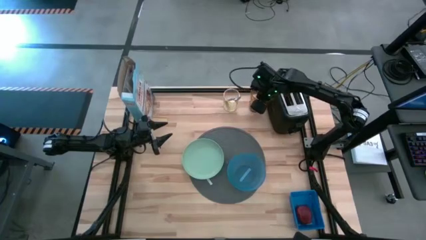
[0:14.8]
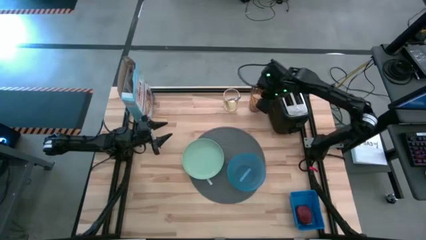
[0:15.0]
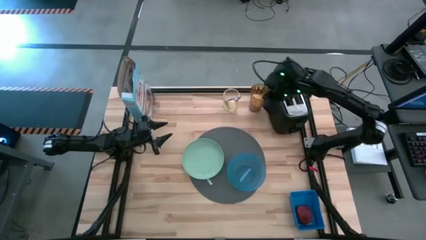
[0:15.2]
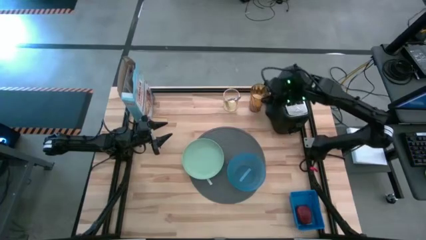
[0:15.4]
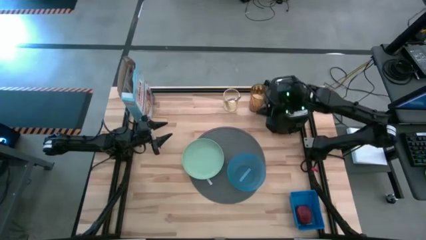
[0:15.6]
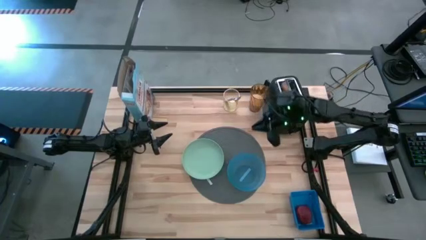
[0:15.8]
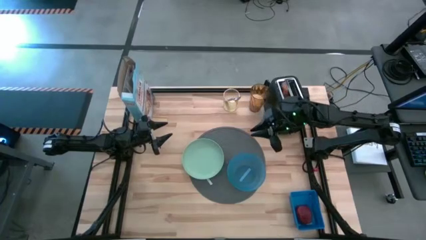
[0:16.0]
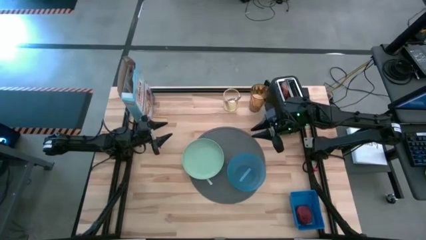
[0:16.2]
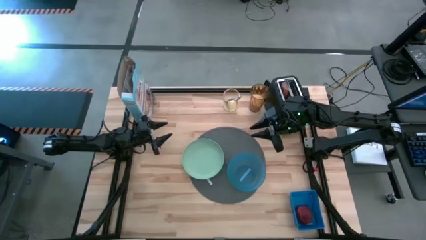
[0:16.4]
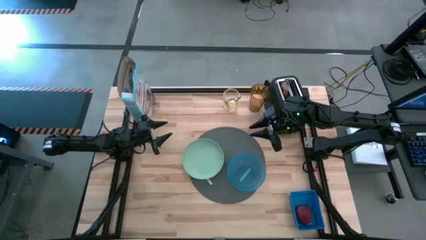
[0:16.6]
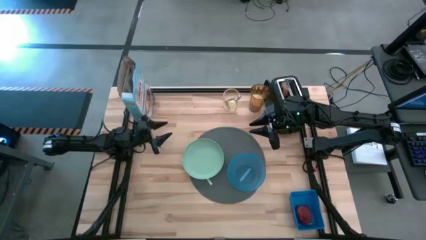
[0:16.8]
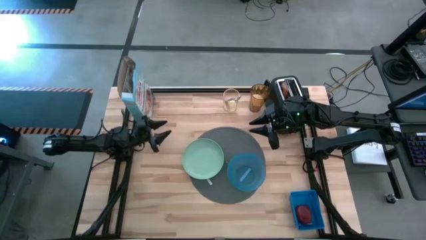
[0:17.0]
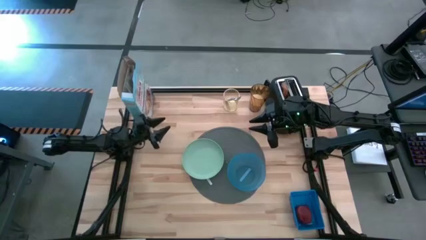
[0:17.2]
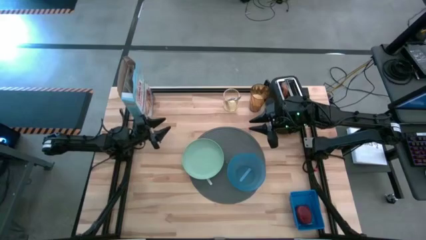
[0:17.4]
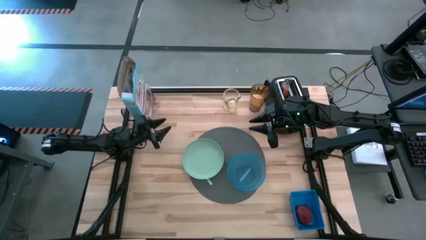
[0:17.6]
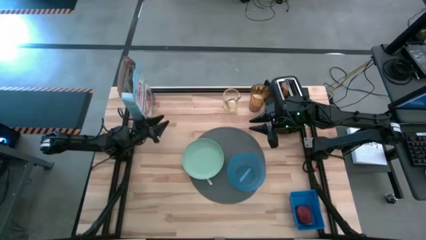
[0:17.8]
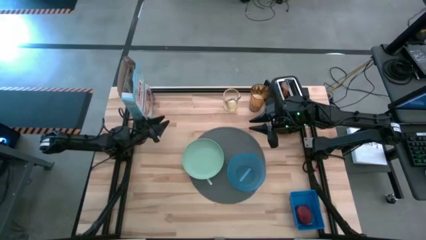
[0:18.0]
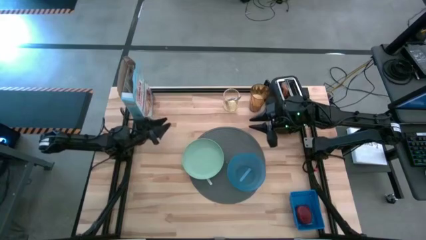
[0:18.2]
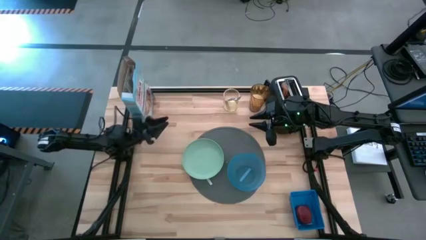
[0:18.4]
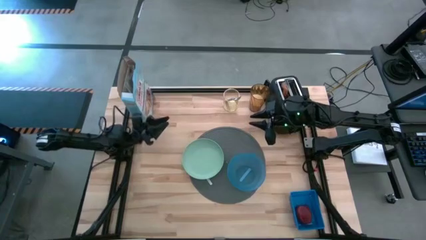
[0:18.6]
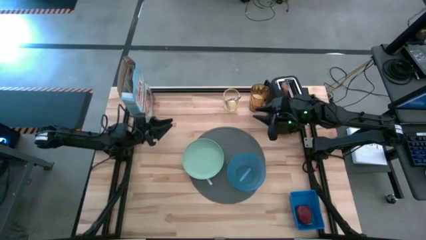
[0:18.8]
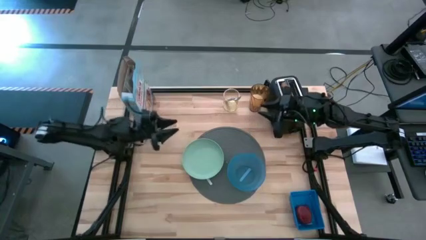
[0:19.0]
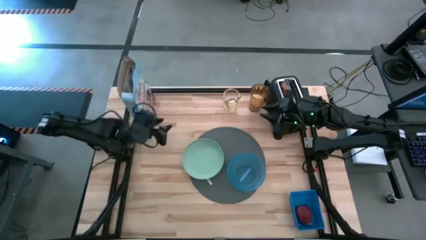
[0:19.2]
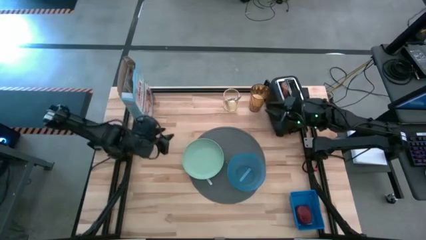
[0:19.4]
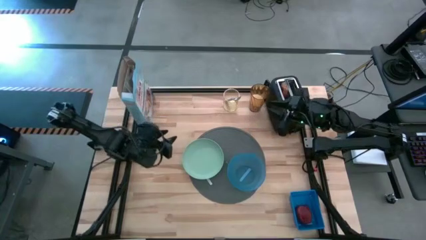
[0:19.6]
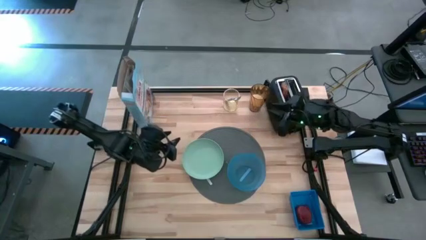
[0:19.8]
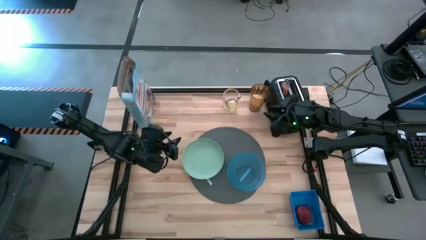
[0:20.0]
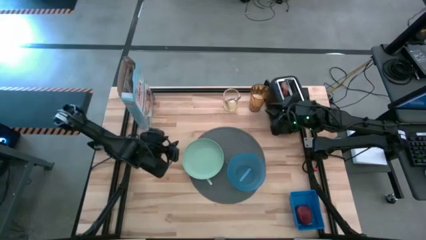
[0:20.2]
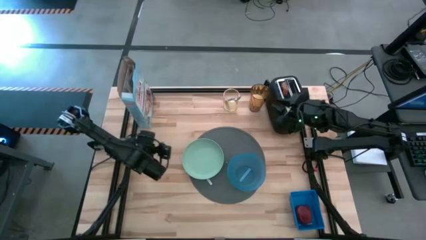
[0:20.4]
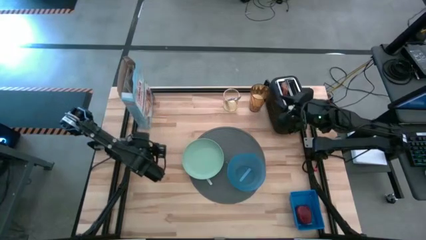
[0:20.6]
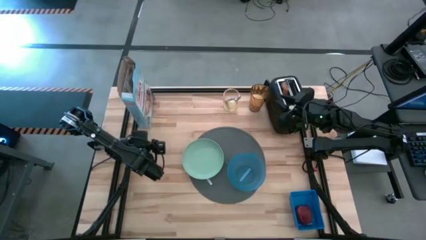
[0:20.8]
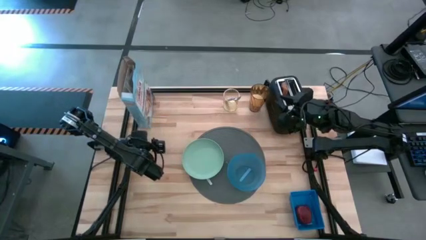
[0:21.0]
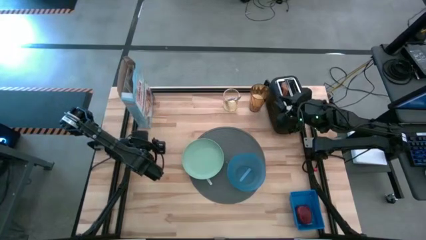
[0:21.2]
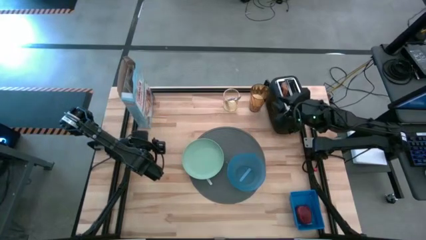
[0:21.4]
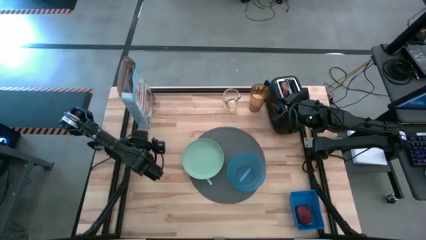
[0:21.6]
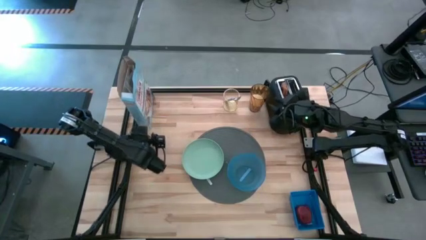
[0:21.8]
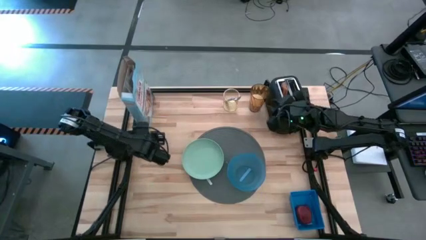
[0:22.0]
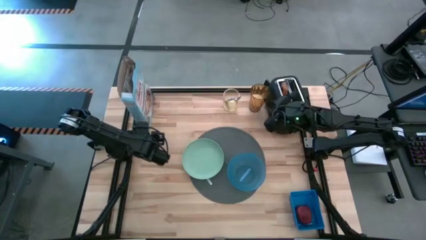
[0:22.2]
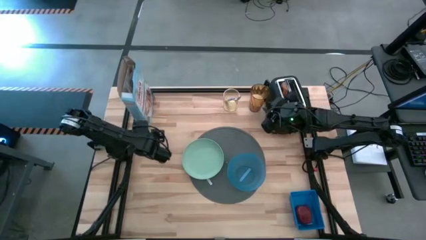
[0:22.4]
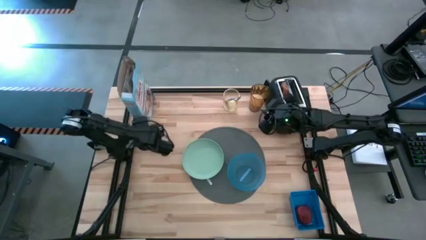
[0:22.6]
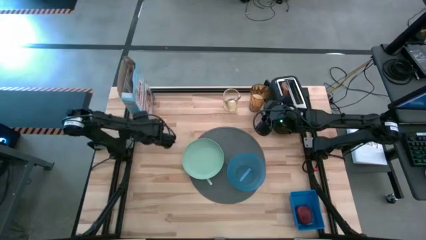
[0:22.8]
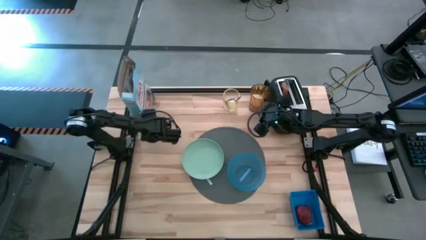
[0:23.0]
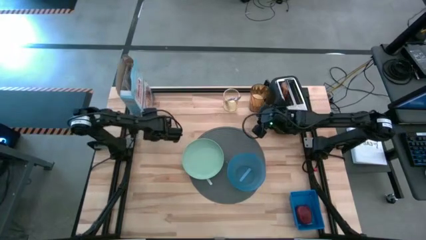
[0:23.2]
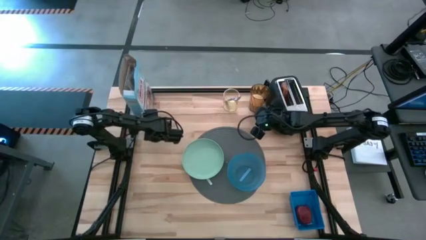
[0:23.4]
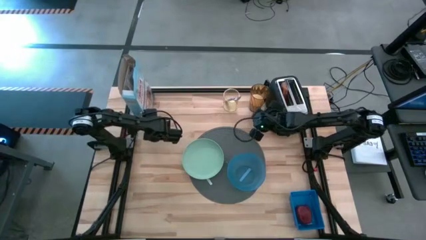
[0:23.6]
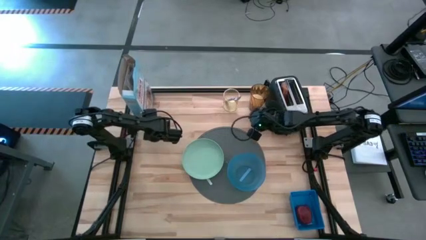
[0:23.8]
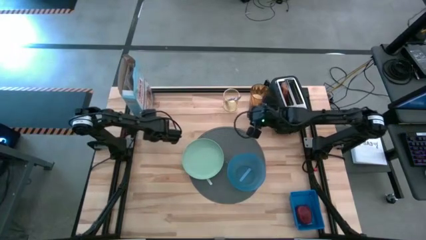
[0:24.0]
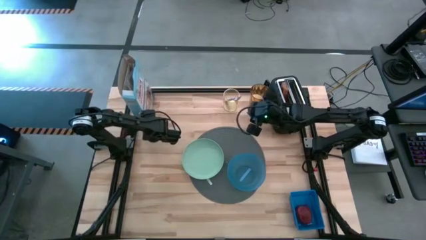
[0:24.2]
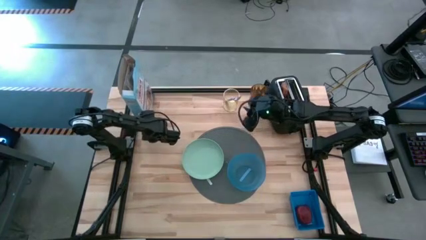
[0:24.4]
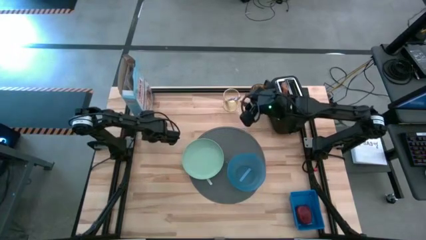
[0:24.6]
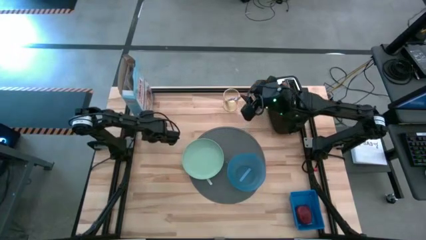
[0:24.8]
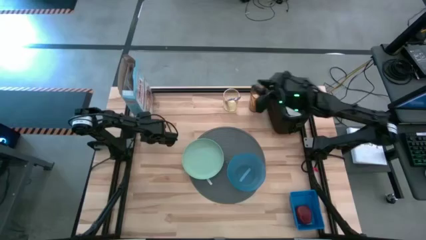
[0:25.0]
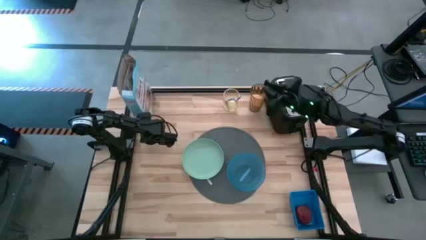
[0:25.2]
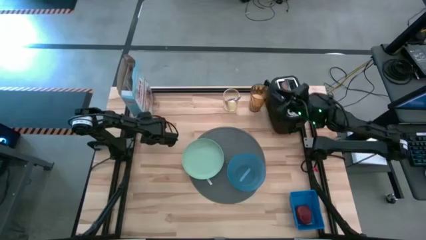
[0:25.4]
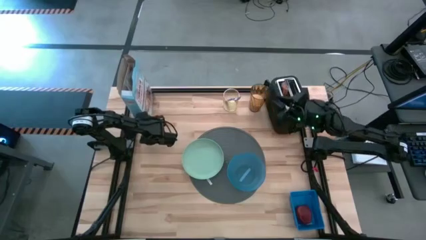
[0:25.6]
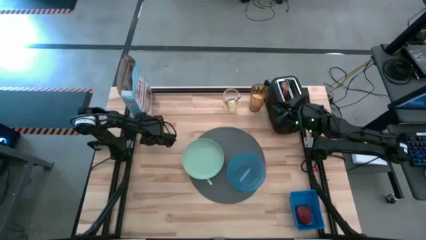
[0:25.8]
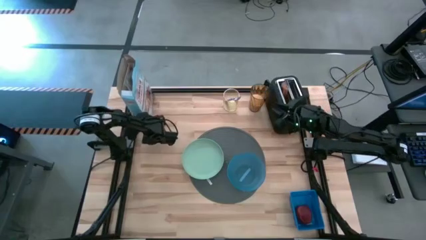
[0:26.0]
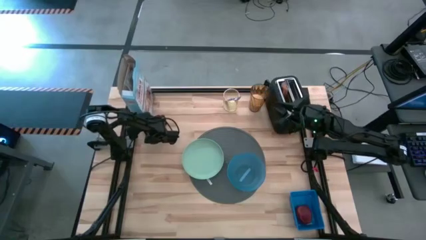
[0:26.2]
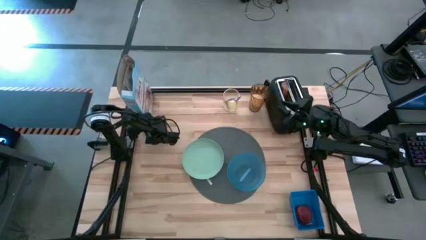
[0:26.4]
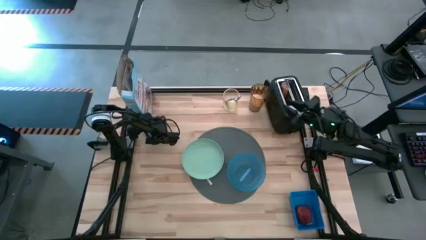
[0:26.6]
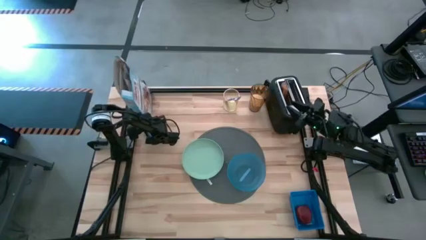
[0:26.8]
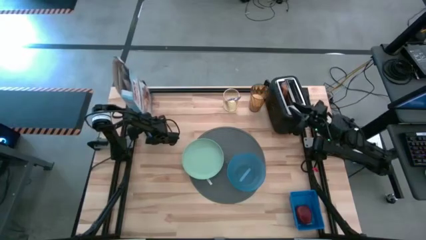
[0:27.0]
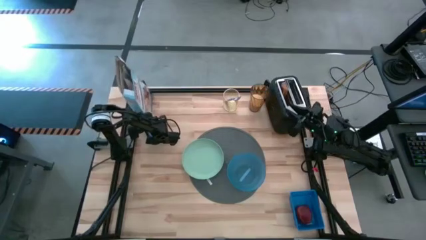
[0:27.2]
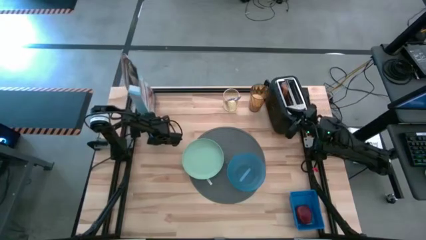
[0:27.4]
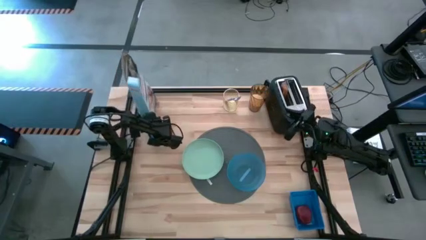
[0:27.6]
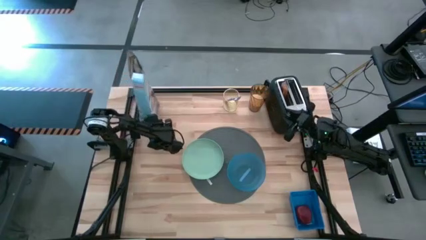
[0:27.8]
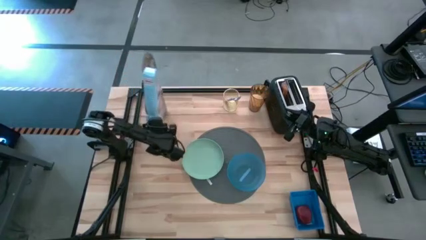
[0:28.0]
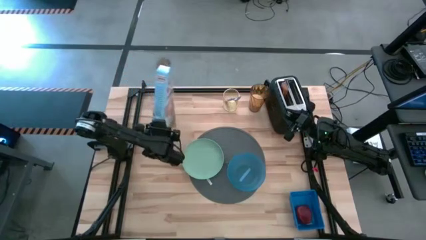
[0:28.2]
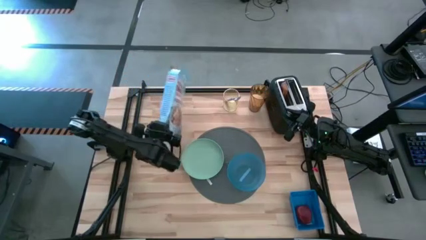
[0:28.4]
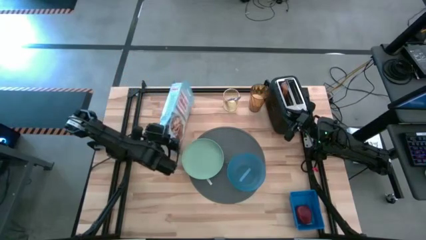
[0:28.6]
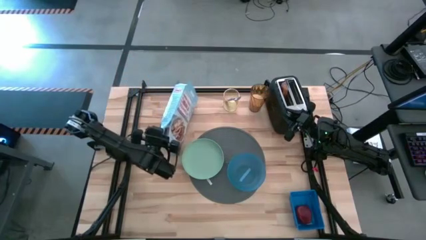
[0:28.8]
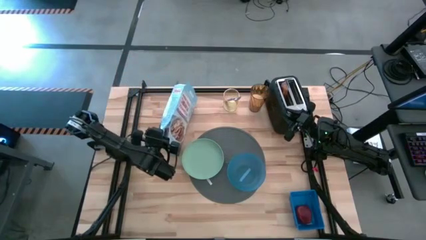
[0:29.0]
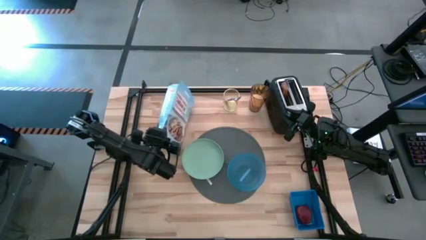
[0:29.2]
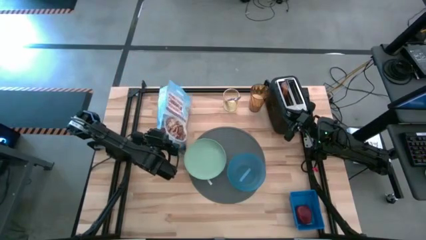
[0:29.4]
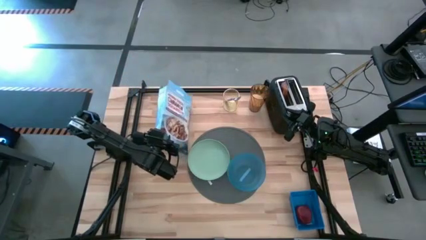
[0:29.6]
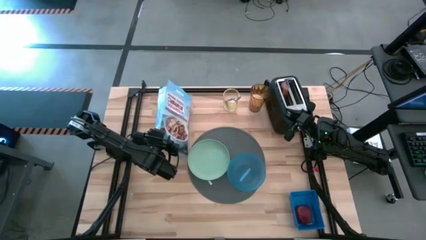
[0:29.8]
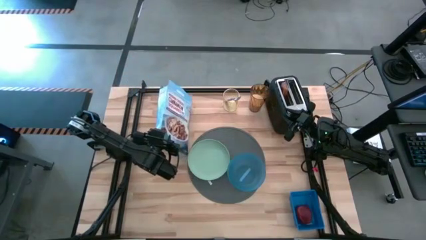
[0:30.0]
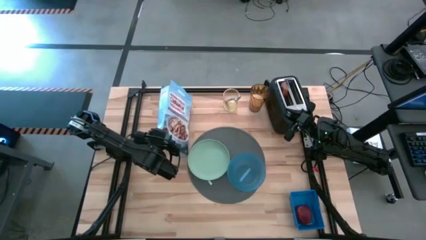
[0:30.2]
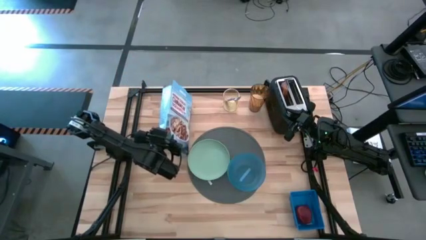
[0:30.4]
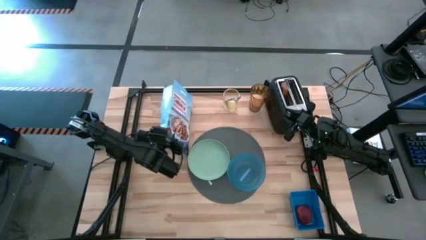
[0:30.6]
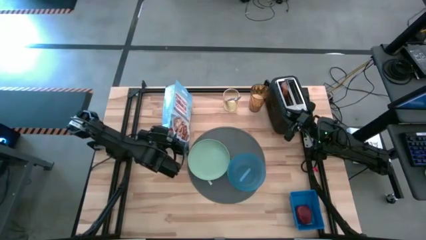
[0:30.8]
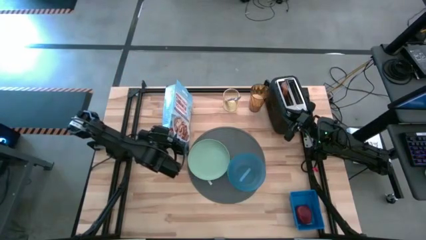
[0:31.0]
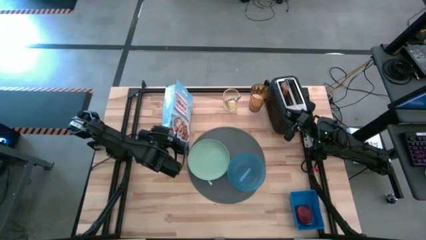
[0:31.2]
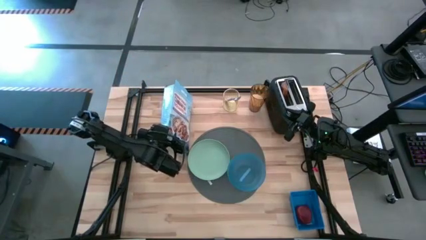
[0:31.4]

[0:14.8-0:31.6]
Task: Arrange a breakfast setting
Pour the cereal from the cereal box into the blue bowl
